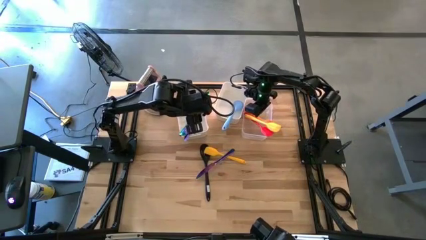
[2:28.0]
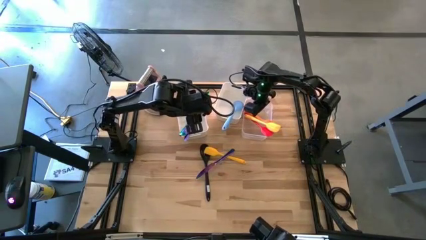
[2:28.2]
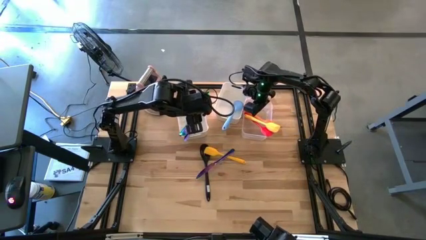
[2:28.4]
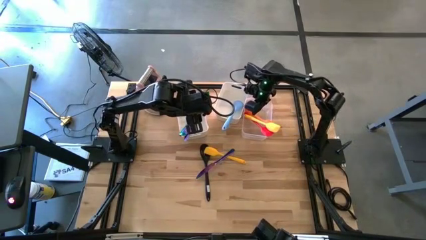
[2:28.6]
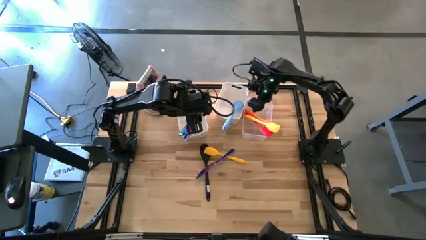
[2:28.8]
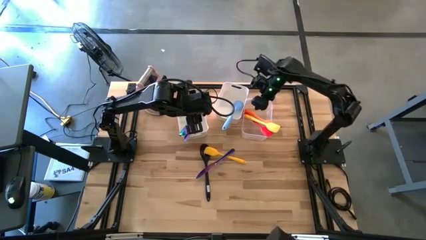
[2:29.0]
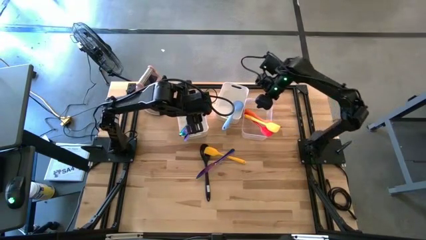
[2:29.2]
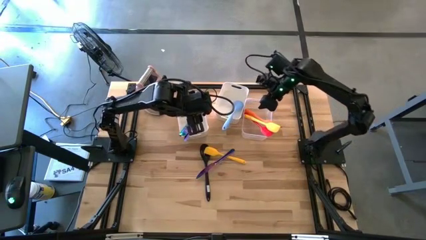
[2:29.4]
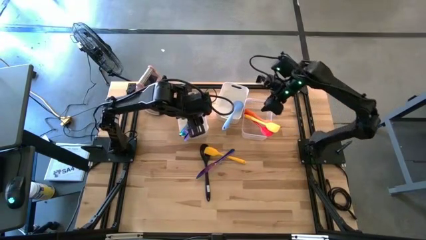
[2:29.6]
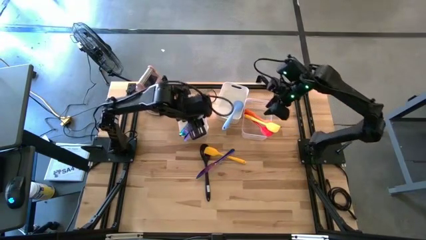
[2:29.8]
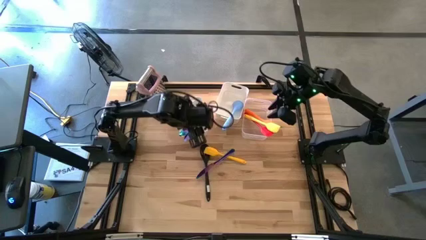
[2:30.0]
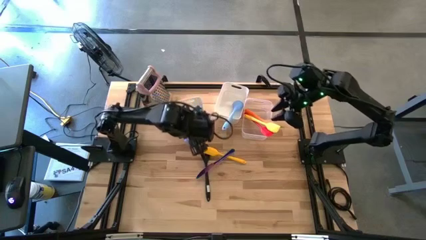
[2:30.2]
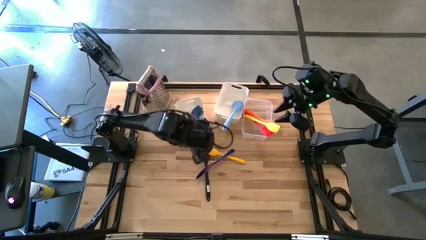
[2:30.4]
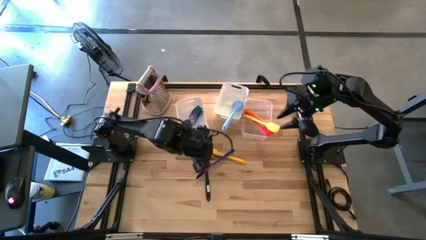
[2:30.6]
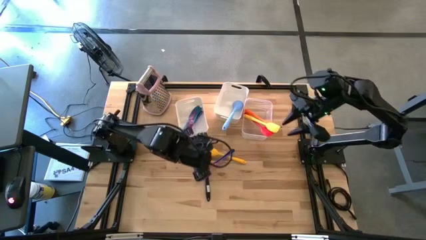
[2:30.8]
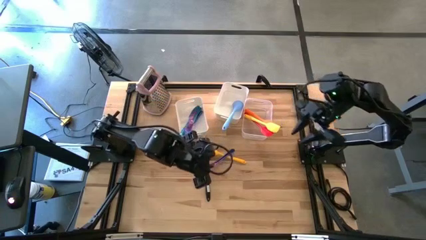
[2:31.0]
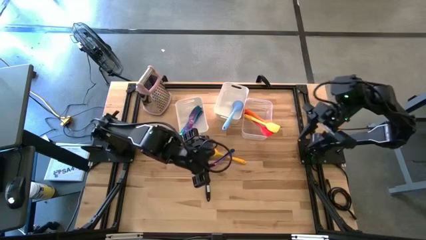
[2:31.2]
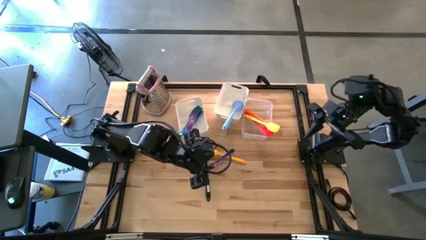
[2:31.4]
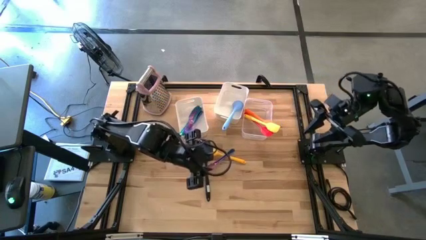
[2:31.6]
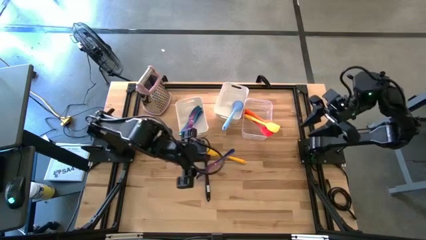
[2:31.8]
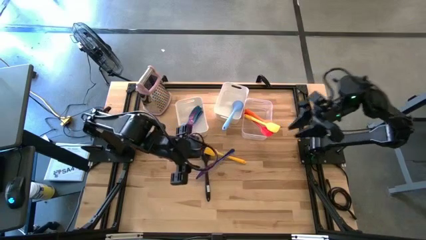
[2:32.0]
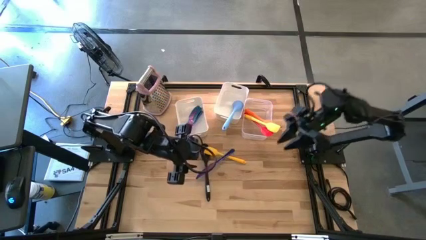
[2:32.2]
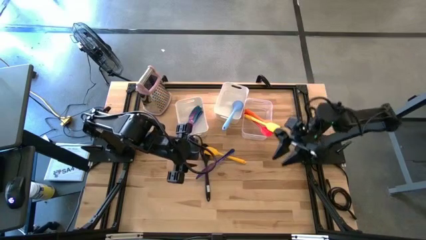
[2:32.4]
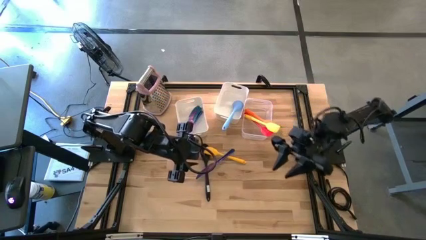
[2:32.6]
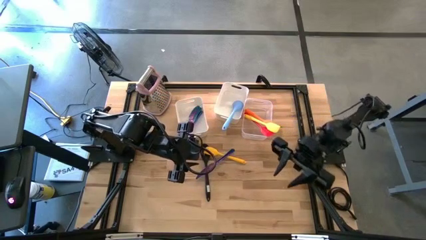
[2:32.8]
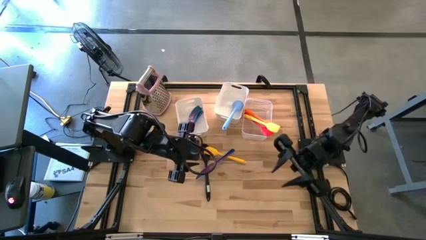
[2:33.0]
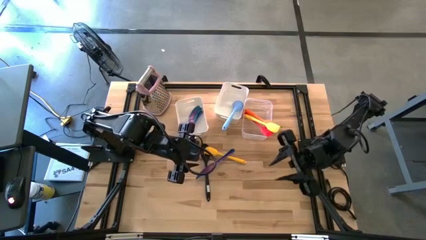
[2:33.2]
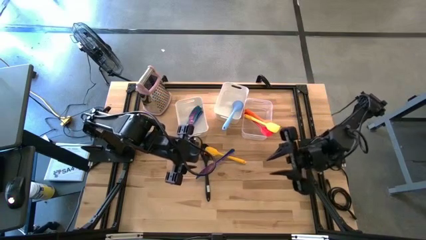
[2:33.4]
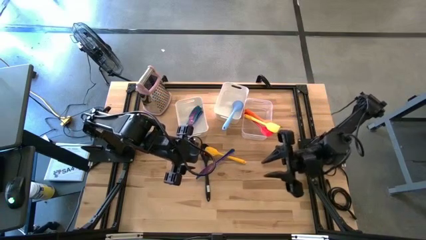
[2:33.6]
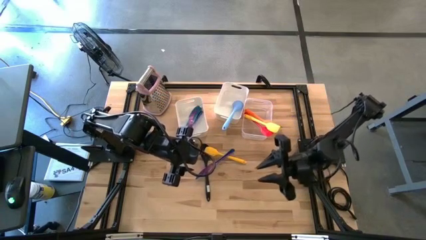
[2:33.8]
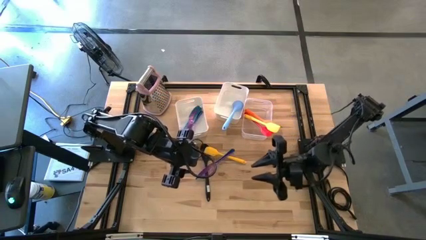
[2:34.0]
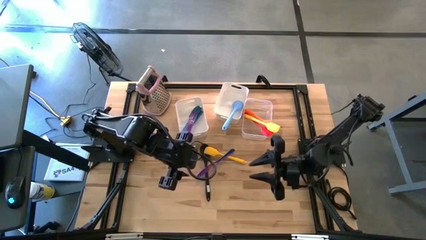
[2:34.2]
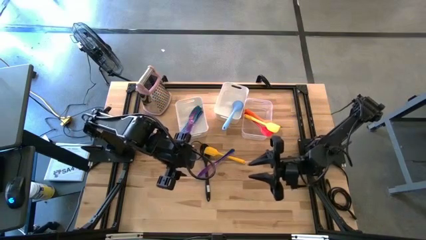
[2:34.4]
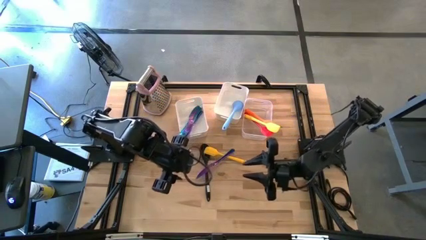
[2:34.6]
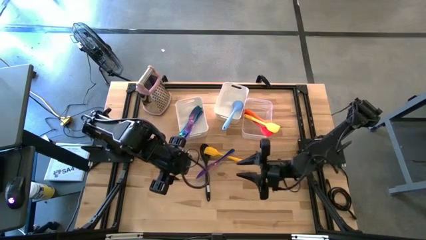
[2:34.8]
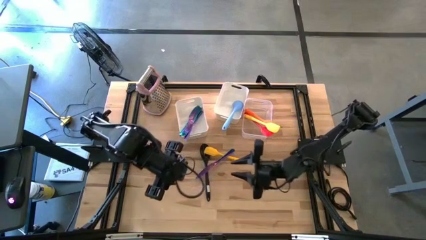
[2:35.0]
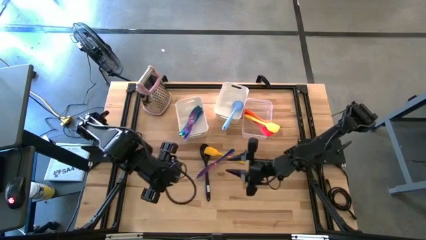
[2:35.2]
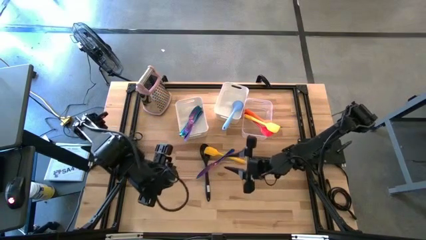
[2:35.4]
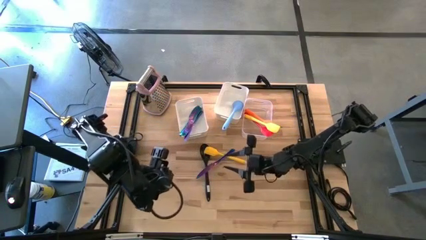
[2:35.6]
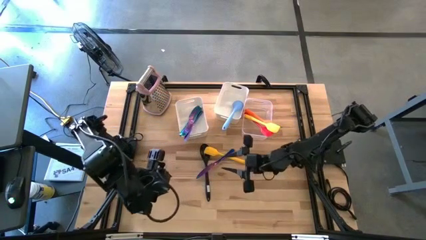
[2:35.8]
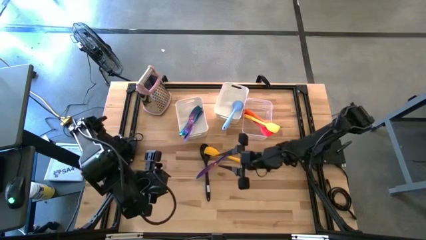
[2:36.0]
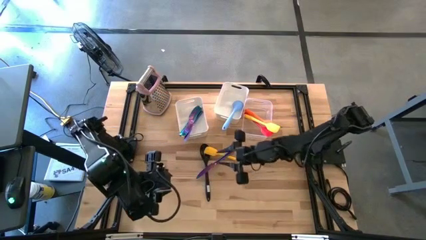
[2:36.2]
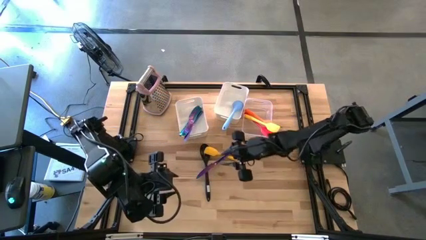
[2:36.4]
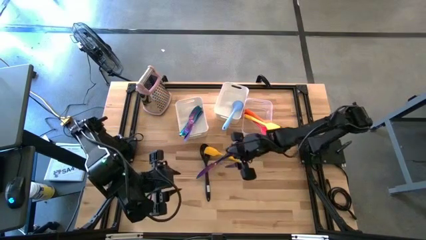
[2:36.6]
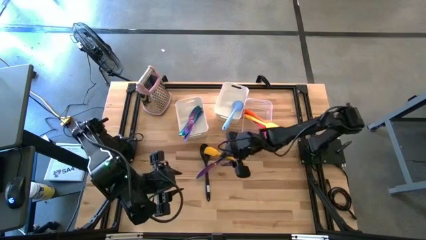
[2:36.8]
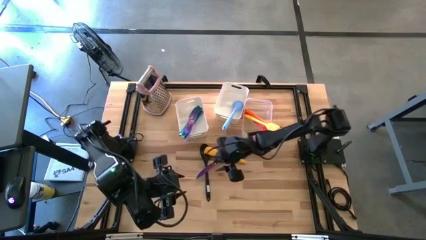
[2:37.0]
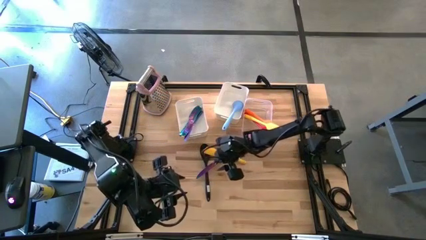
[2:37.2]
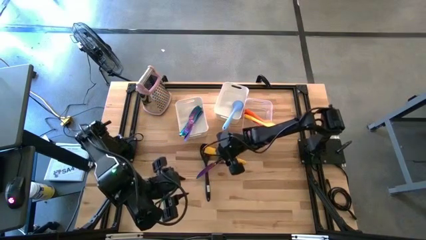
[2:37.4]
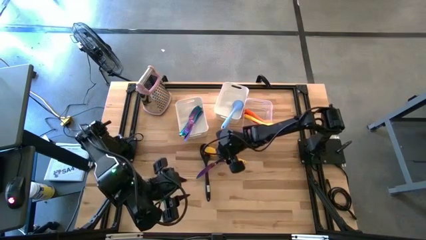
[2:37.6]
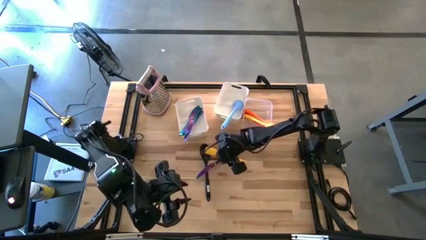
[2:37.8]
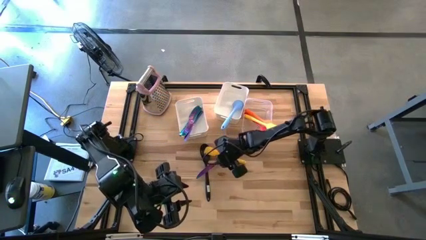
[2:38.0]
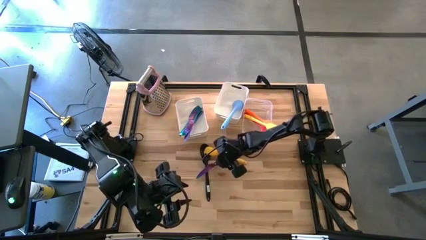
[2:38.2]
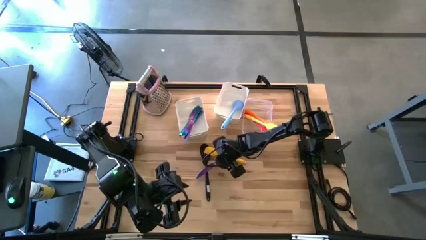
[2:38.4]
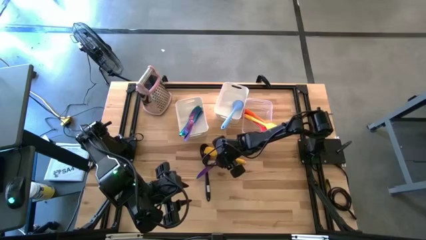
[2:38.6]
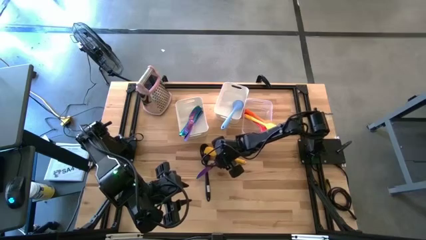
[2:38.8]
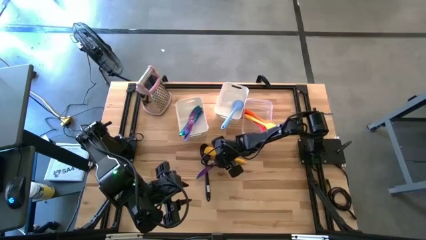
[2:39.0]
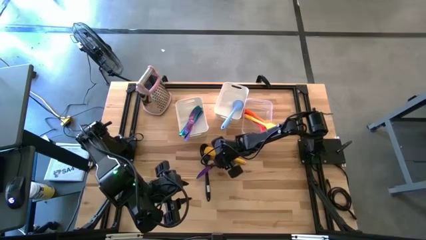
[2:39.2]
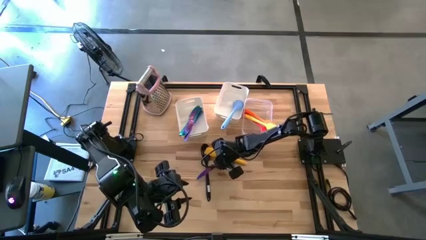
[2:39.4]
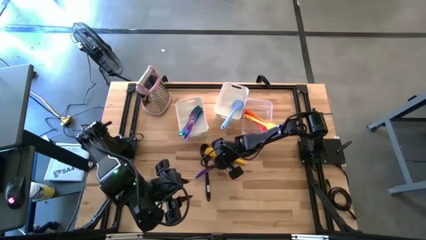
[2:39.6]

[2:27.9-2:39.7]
Task: Pick & Place Kitchen Items
Put the violet table knife into the left white bin

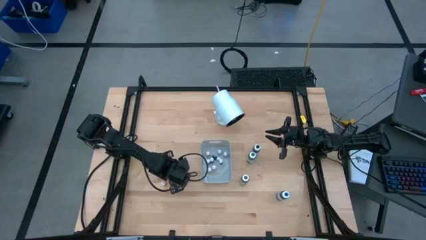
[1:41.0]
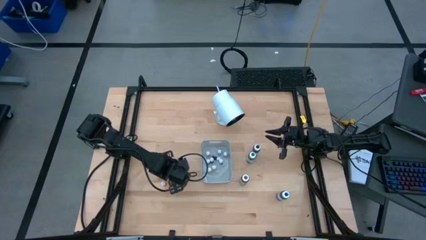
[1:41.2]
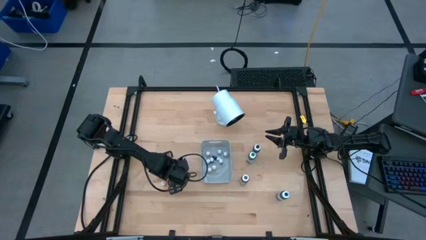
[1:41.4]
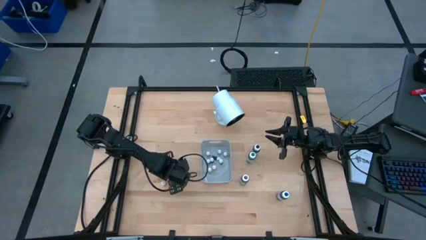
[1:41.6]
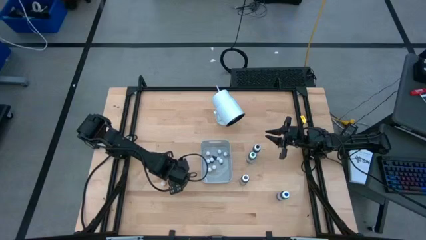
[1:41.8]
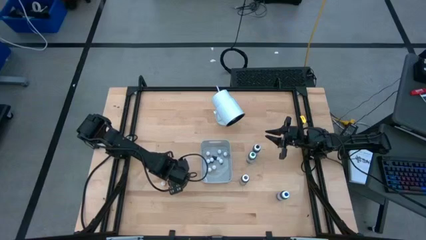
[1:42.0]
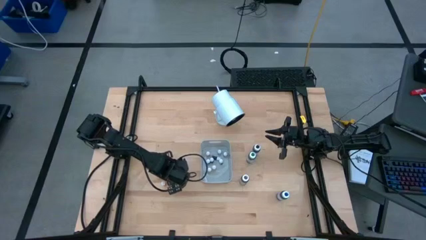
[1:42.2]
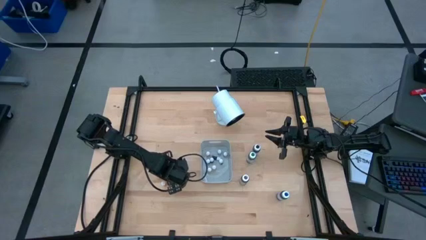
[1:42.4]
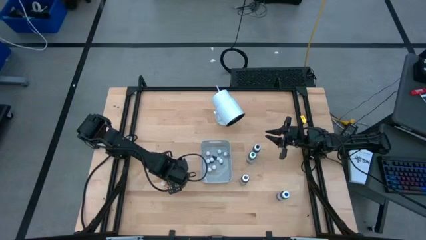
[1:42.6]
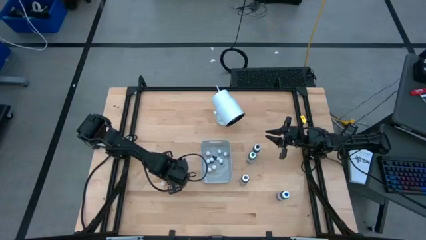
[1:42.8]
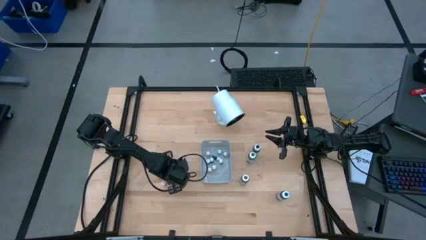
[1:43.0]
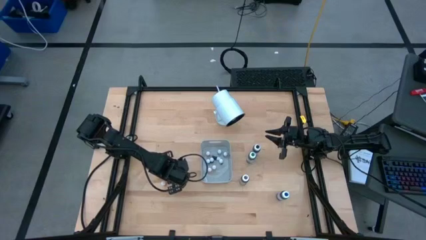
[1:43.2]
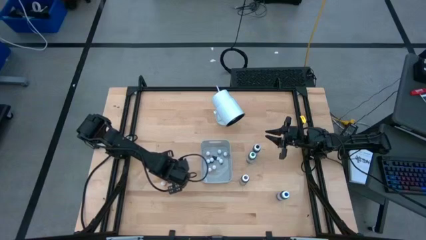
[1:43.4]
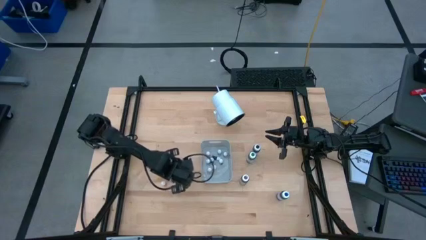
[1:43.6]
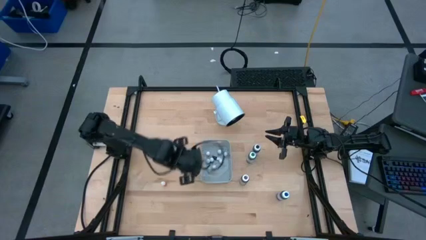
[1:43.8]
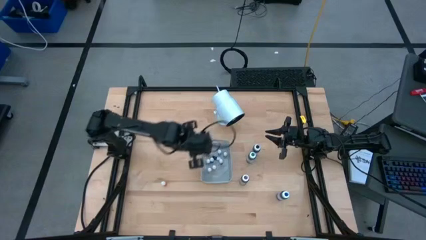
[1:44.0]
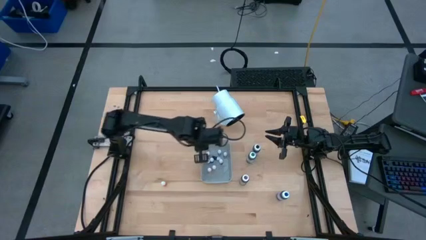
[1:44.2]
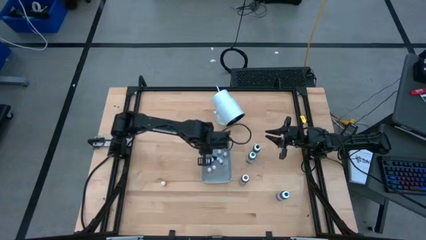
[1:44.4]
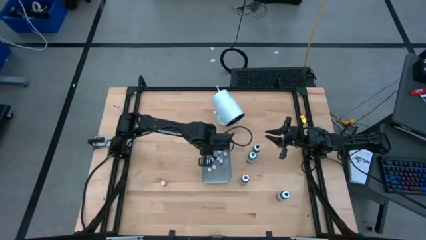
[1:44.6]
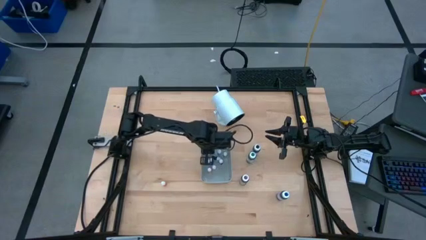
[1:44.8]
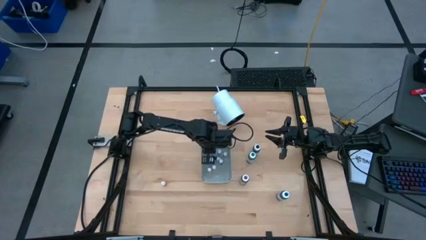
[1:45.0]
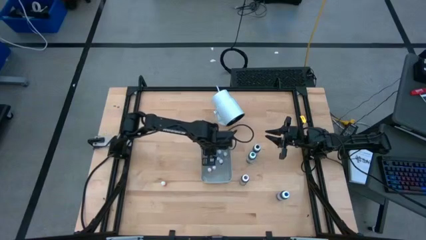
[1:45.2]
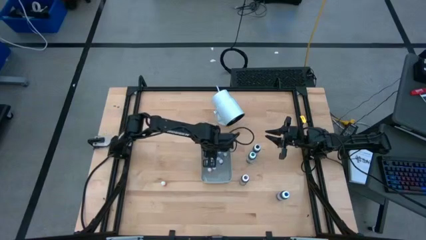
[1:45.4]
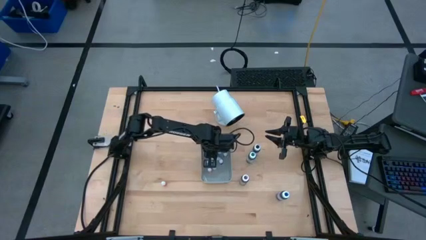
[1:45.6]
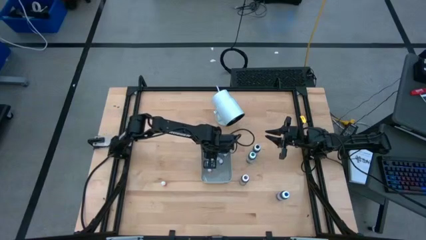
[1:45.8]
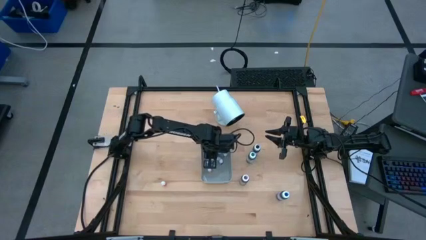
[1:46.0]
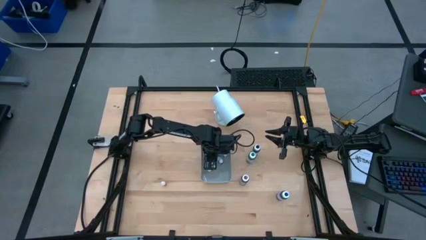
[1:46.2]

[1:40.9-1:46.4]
Task: Pick & Place food coloring
Put the small blue food coloring bottle into the gray bin
